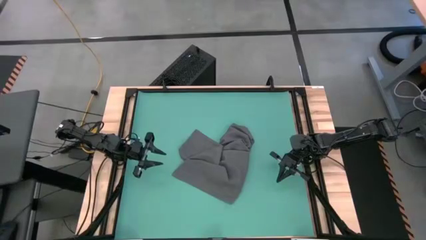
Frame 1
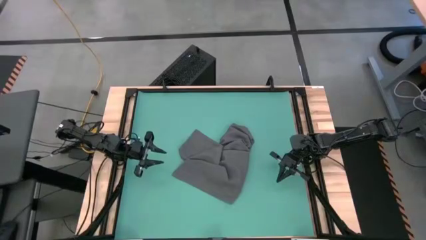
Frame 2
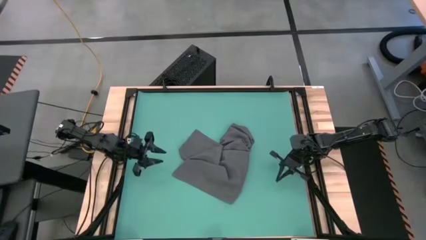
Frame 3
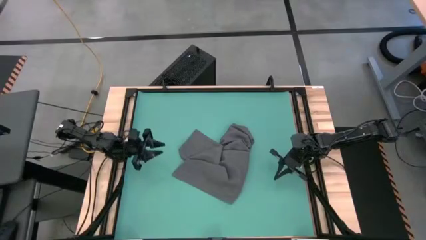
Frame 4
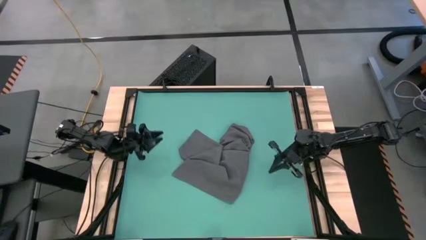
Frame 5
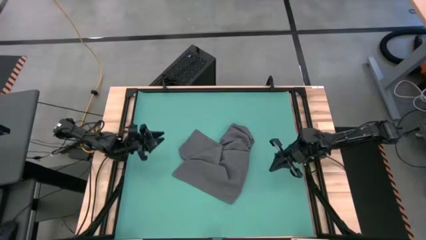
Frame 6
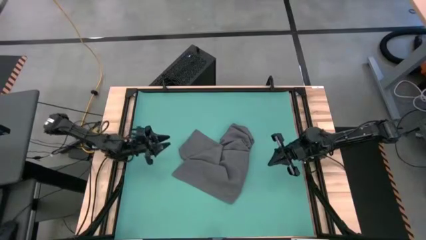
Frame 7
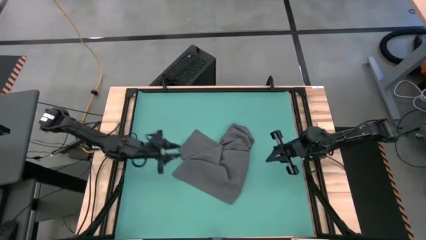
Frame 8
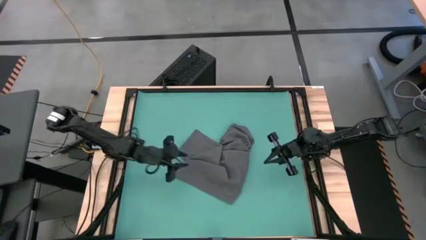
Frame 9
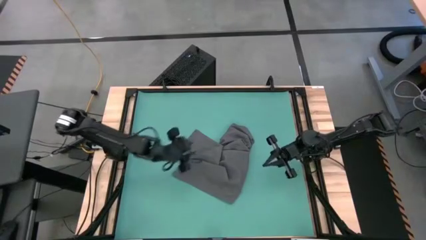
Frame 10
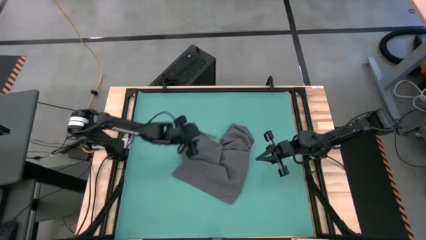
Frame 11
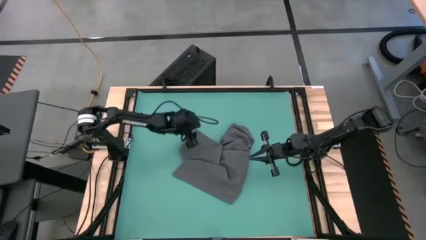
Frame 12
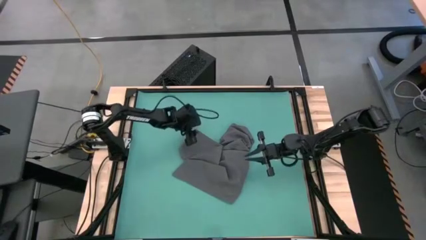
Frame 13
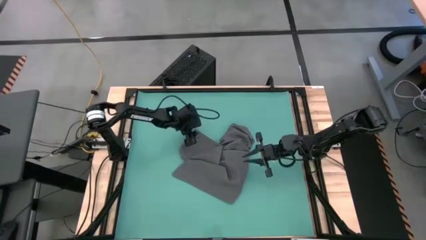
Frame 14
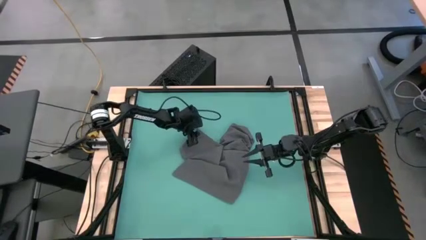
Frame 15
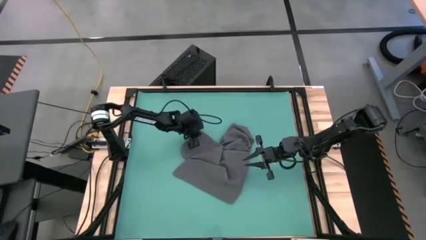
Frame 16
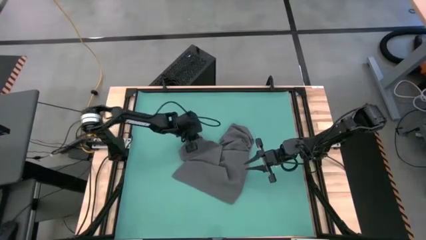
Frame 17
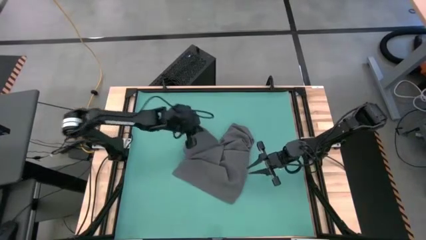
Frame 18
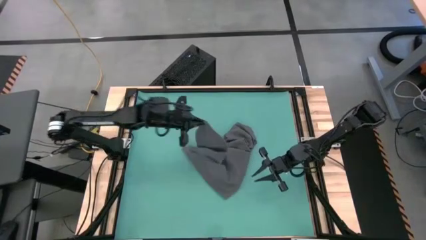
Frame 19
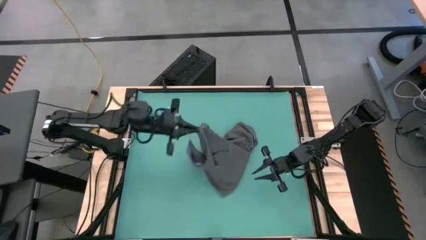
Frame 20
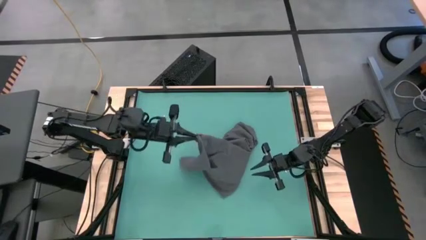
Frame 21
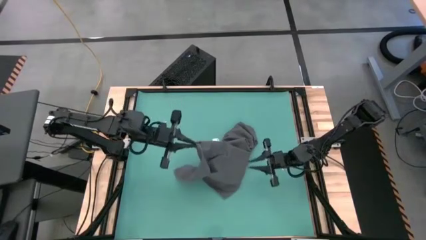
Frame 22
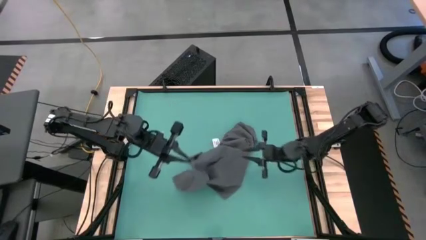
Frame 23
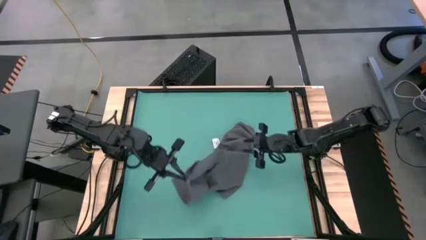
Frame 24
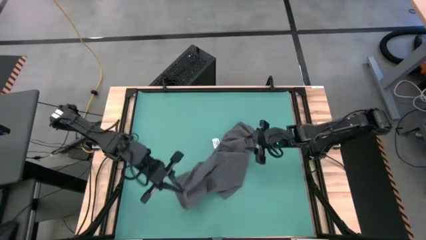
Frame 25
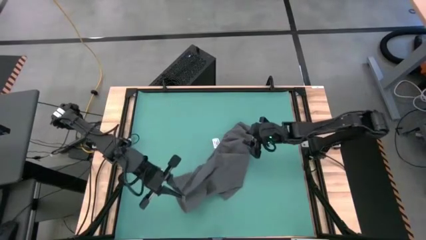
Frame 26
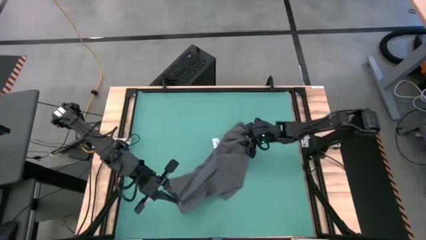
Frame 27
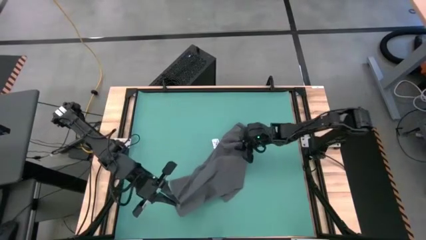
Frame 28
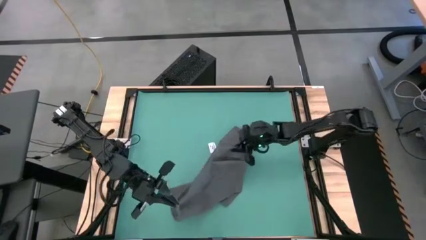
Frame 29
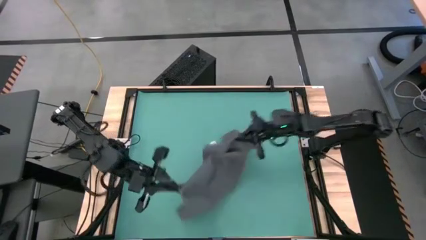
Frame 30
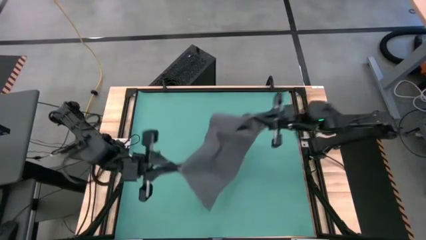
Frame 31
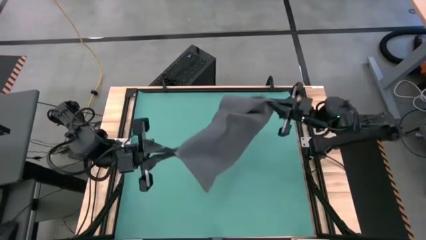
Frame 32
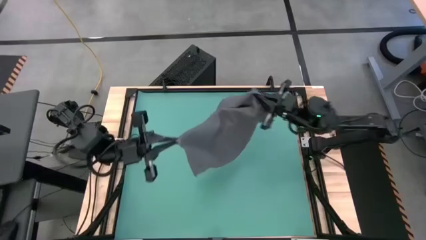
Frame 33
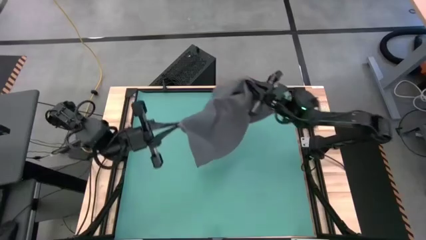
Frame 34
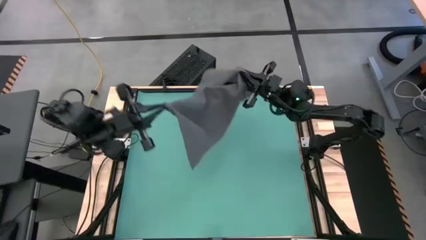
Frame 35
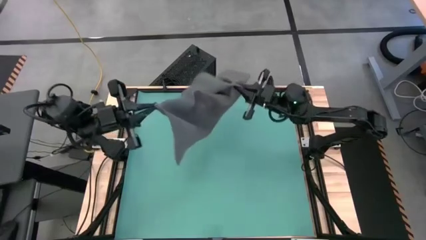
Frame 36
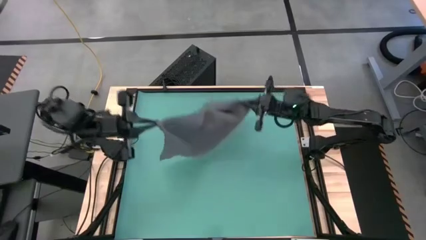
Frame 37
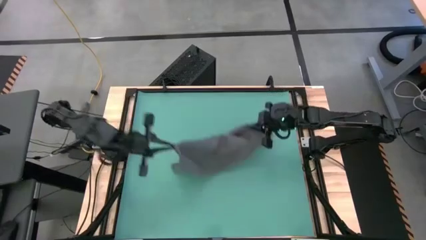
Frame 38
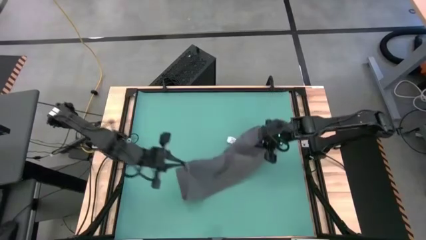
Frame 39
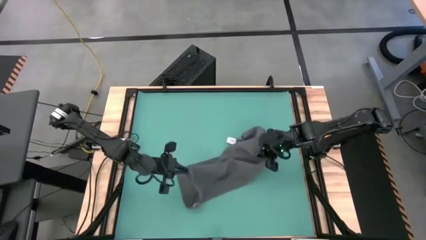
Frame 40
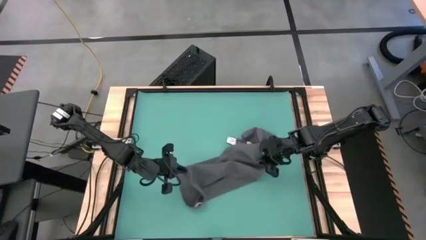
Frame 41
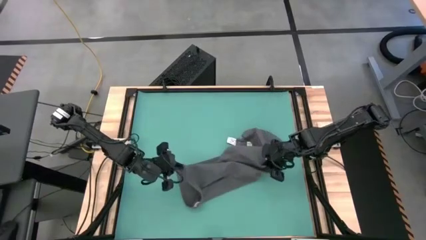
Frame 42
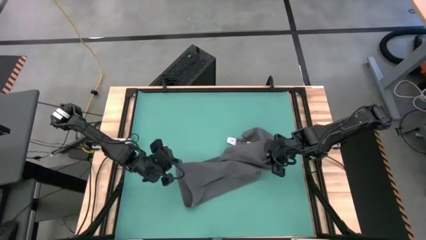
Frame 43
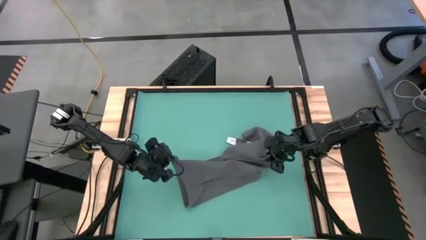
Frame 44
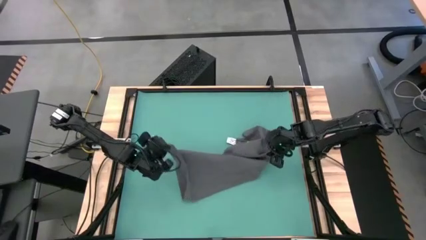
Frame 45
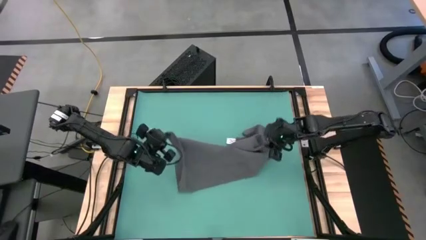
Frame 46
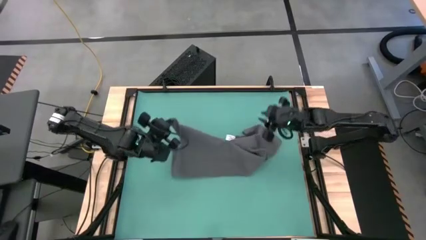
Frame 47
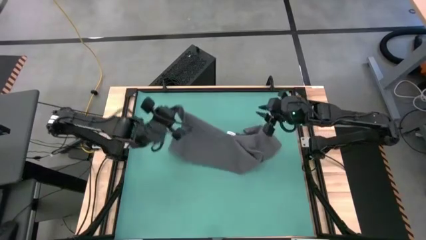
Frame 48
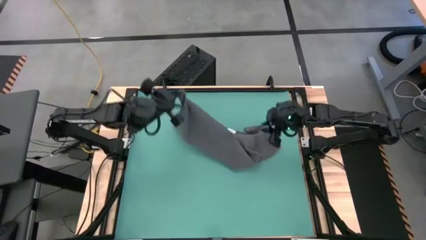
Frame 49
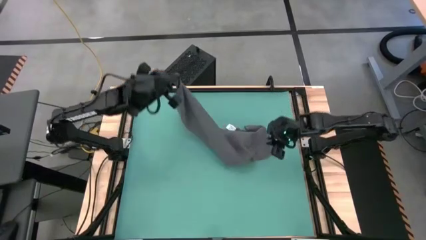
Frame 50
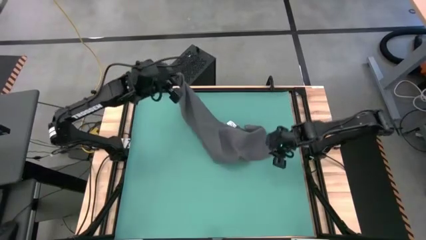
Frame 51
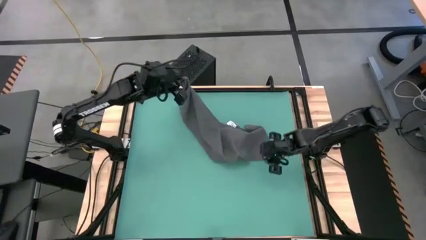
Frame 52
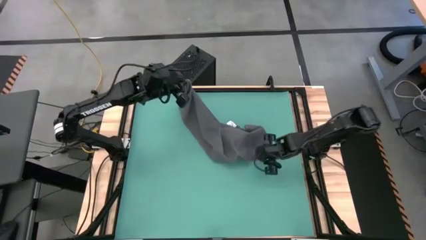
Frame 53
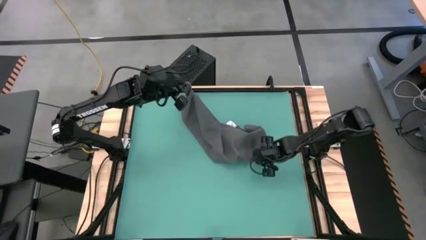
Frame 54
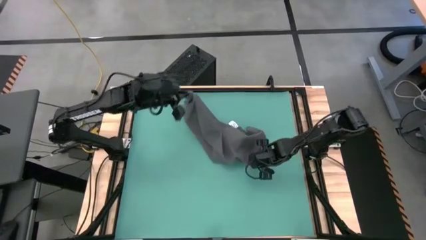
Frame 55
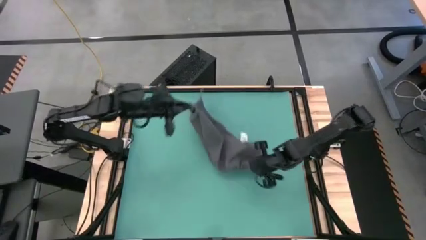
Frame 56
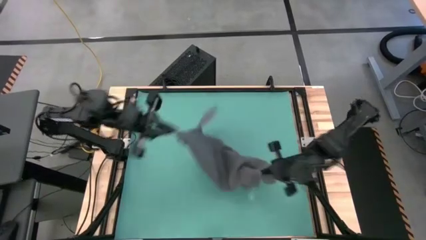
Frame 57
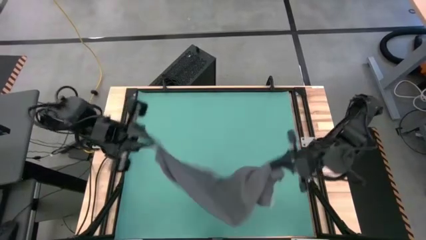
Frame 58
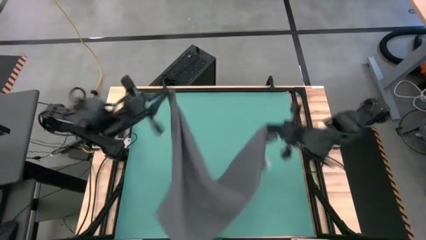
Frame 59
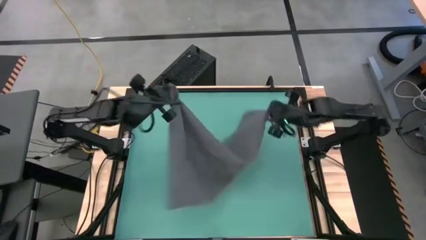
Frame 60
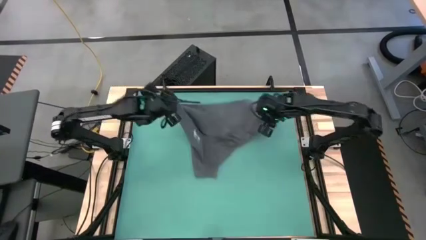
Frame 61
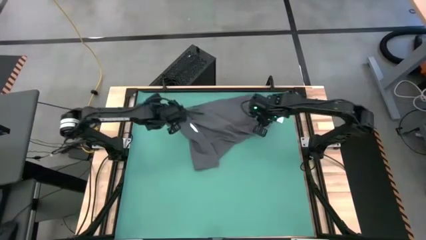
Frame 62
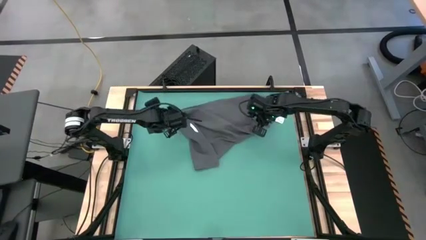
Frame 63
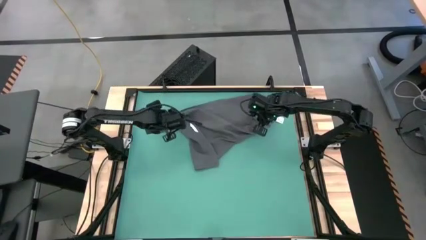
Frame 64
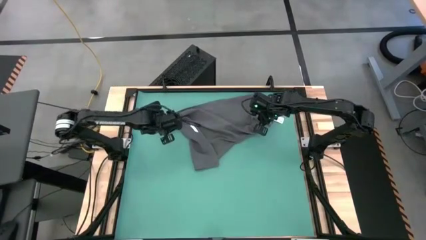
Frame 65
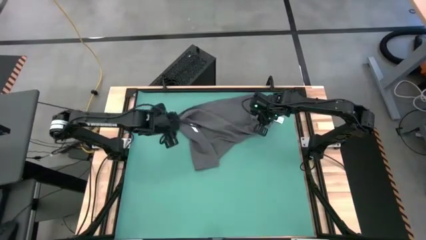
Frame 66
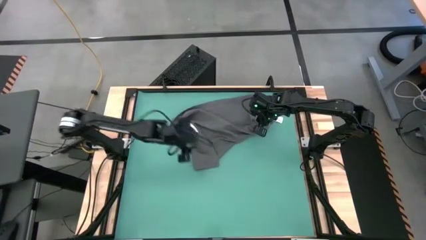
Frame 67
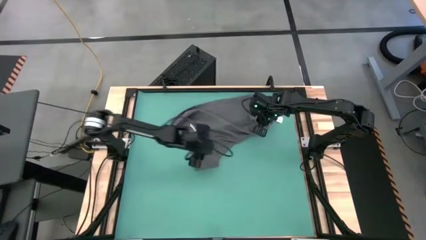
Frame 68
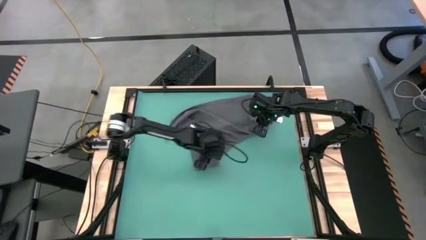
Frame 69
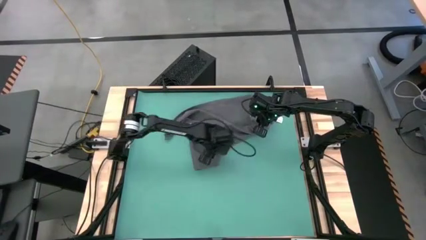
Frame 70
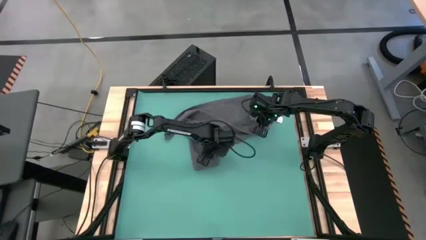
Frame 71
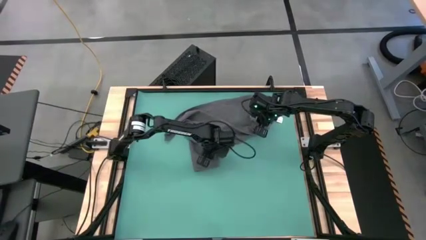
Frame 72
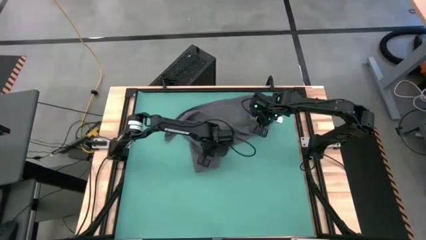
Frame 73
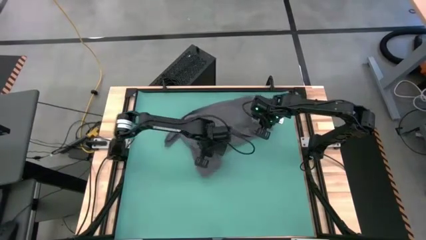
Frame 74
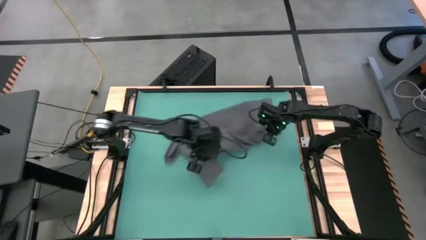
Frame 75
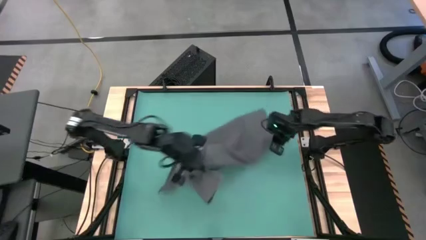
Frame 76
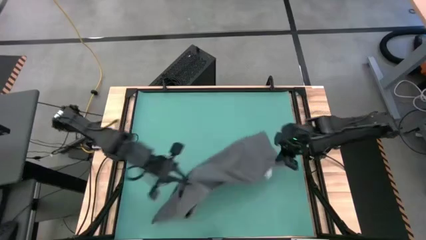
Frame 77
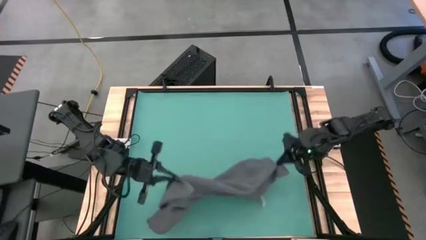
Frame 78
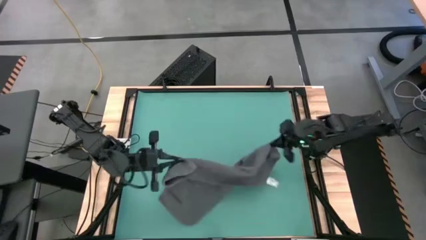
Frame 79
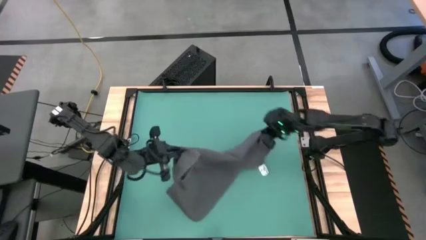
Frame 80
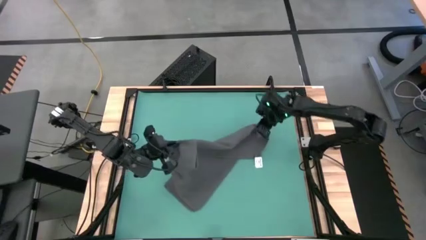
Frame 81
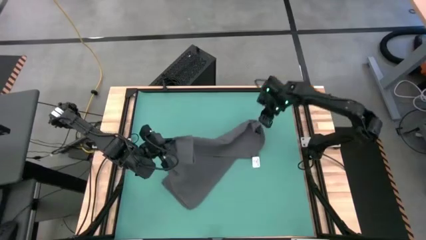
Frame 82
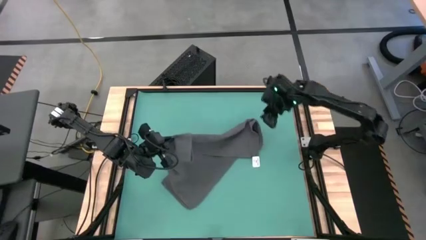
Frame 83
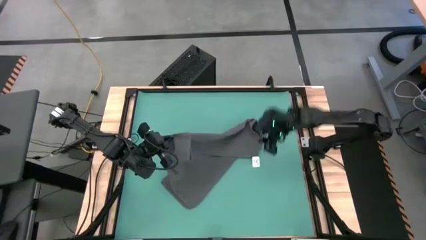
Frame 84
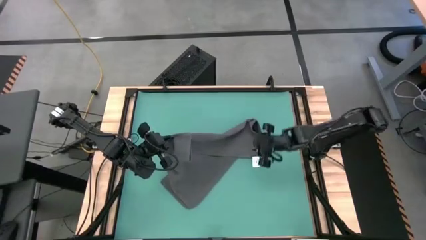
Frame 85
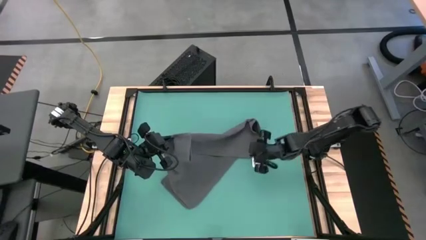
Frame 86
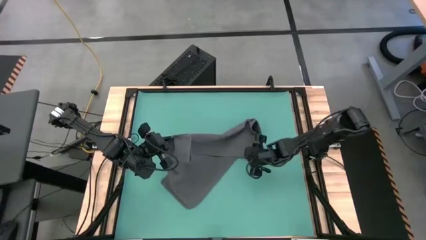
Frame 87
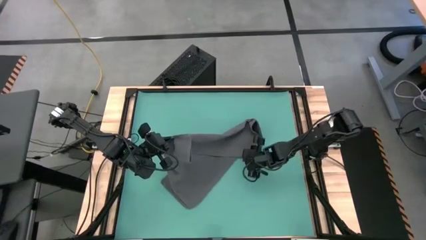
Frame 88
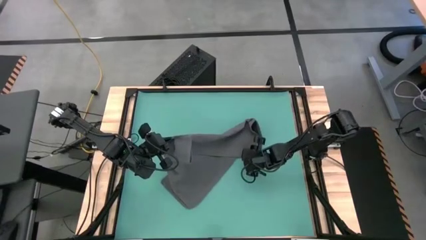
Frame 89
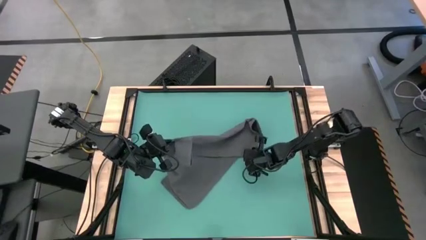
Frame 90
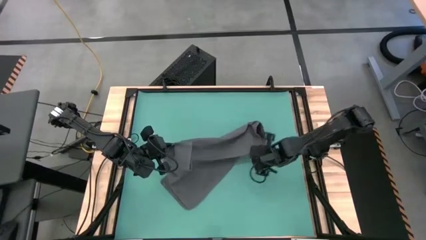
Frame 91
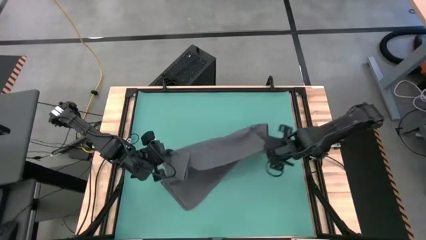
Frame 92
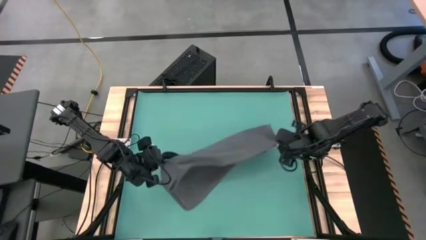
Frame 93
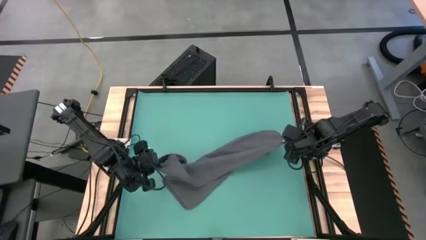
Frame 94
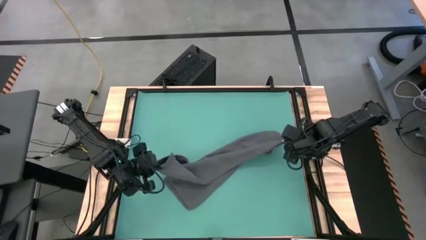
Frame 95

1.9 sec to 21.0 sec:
Task: Roll towel
Roll the gray towel
